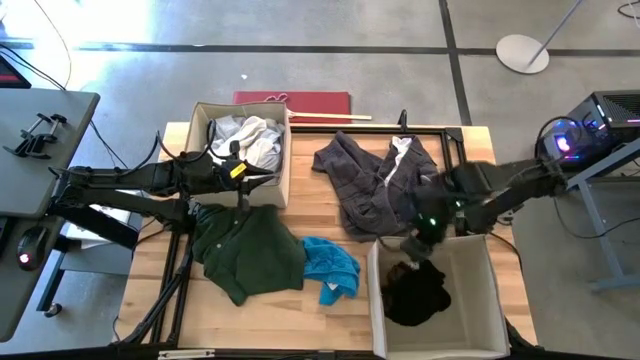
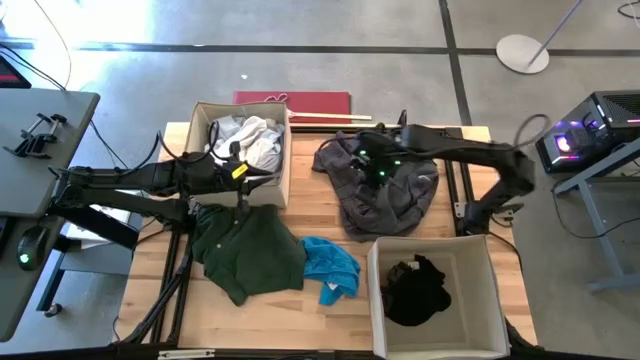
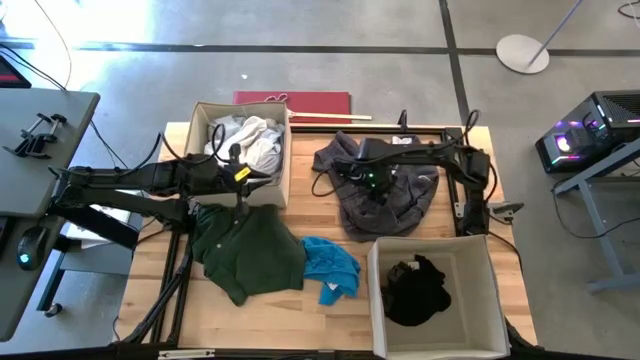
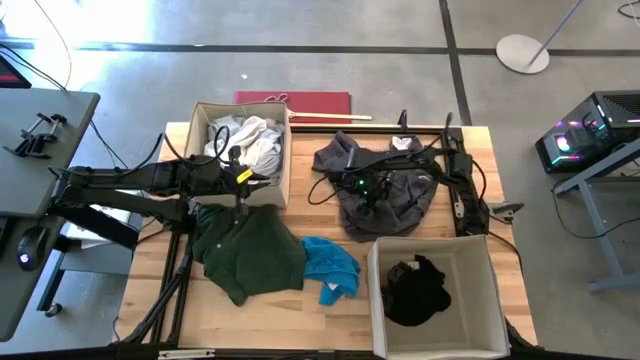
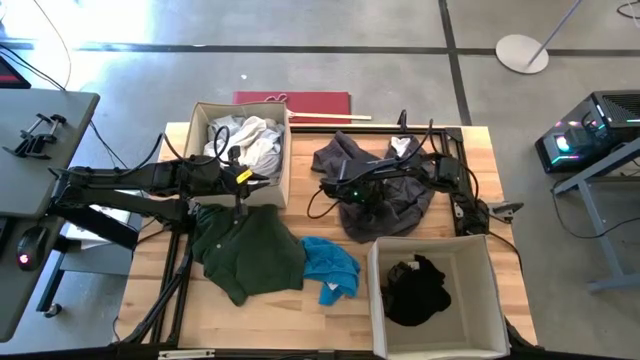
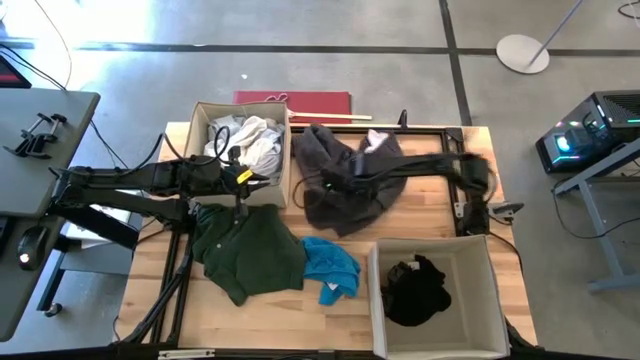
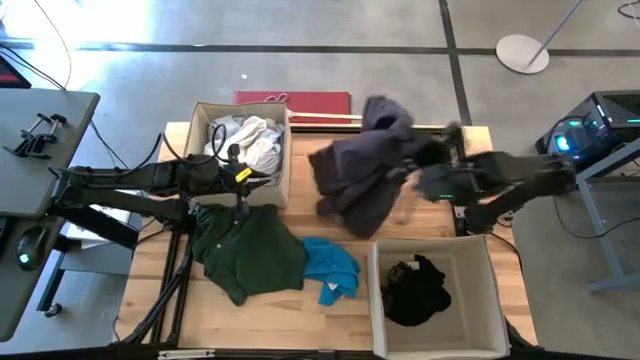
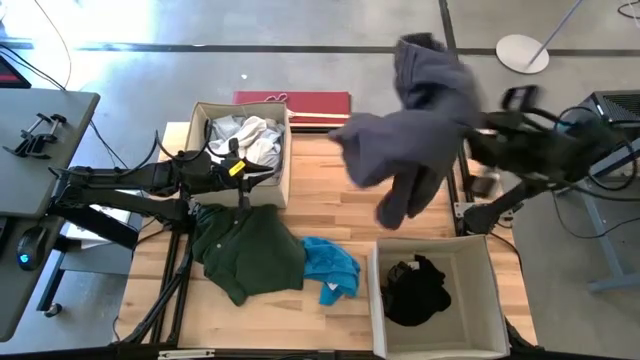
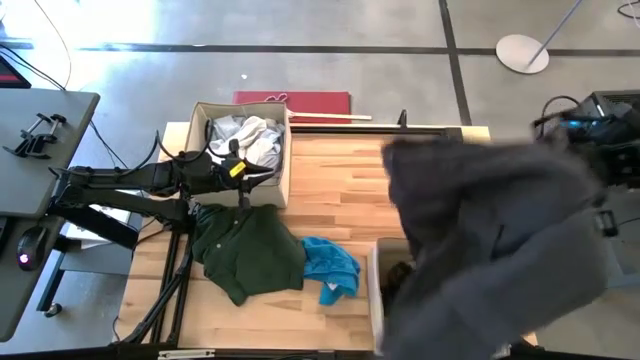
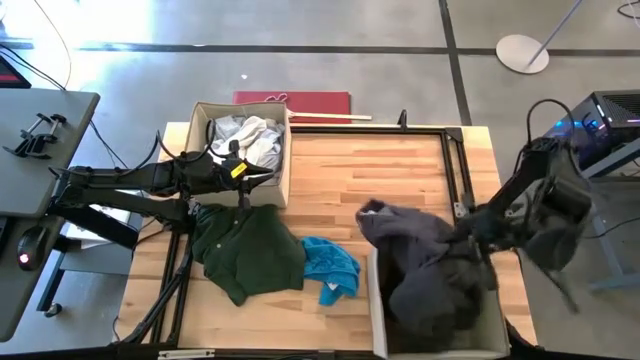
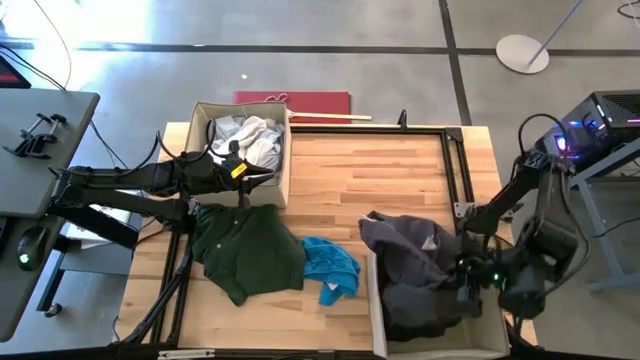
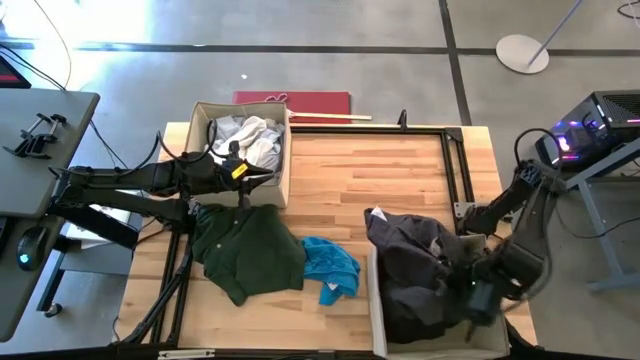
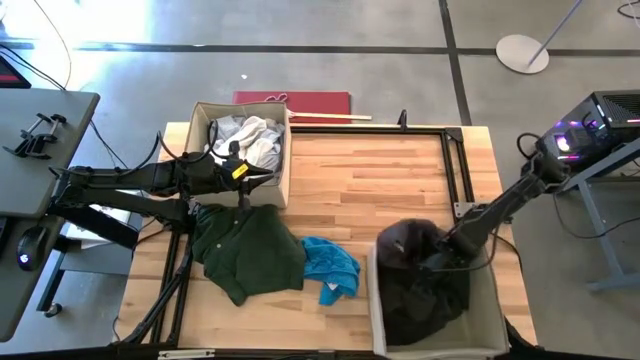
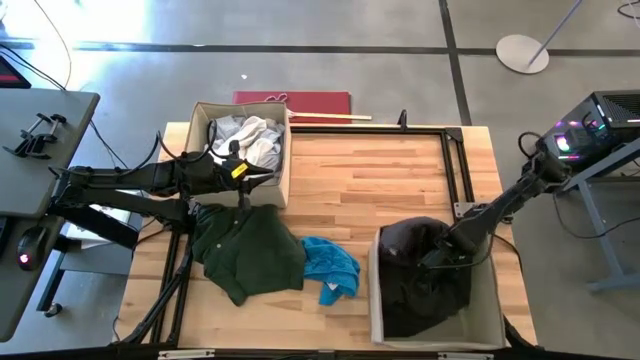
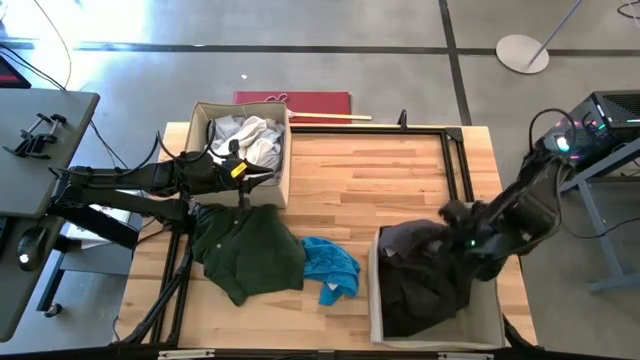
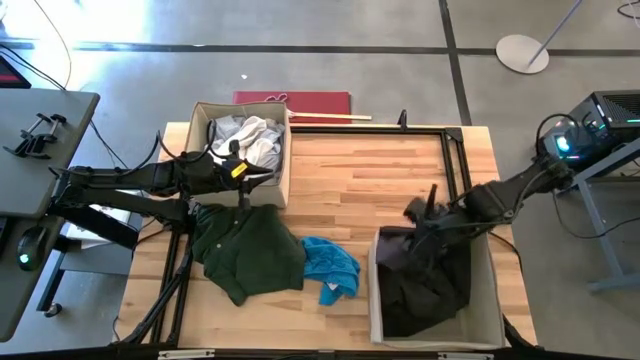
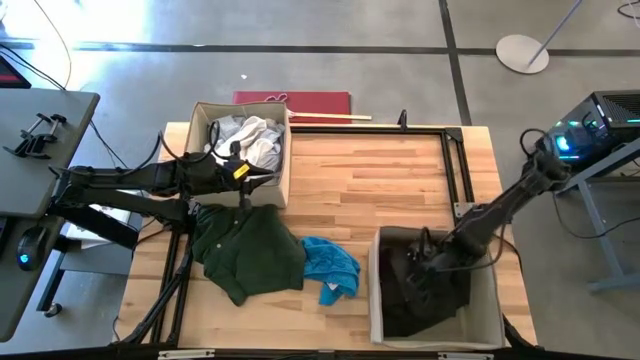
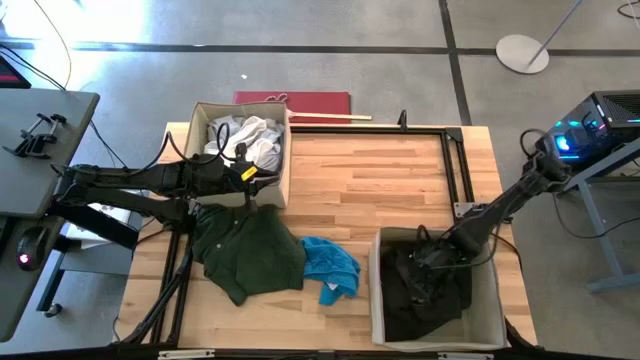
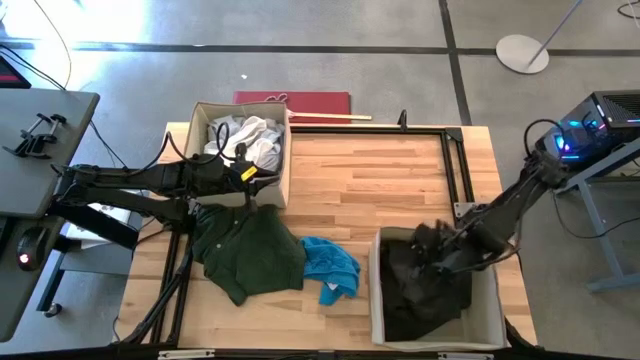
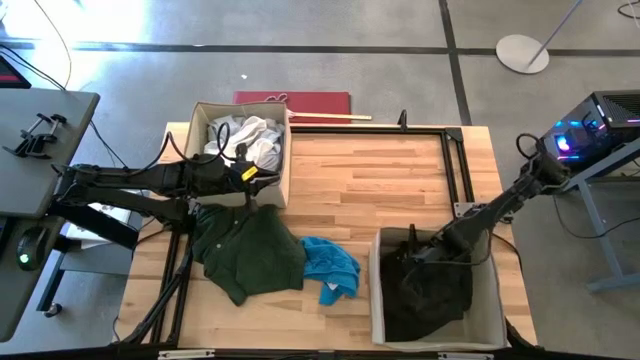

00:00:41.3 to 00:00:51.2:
Task: Sort clothes
Put the gray shorts into the bottom laundry organizer

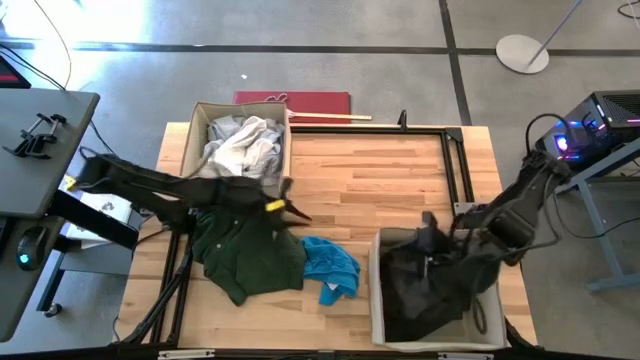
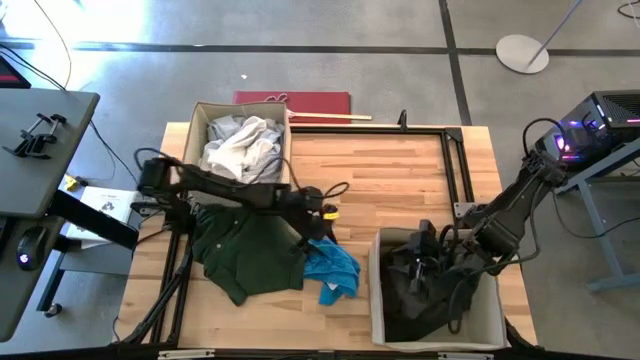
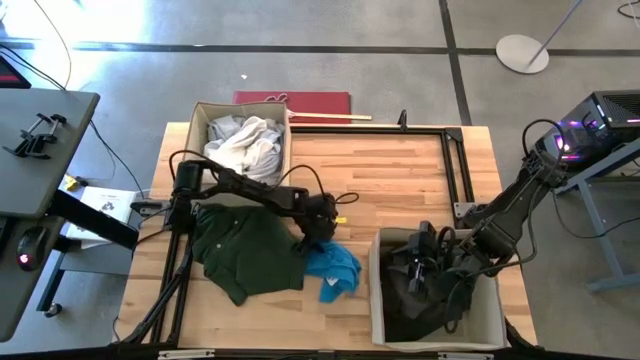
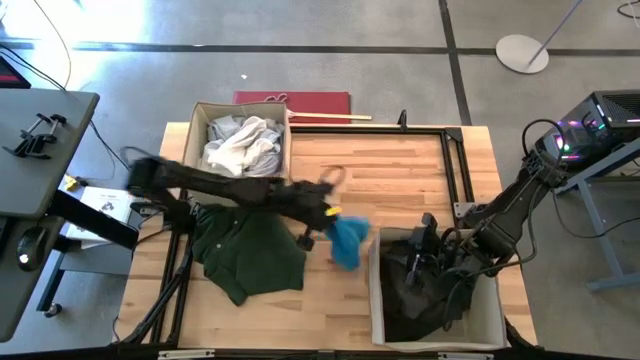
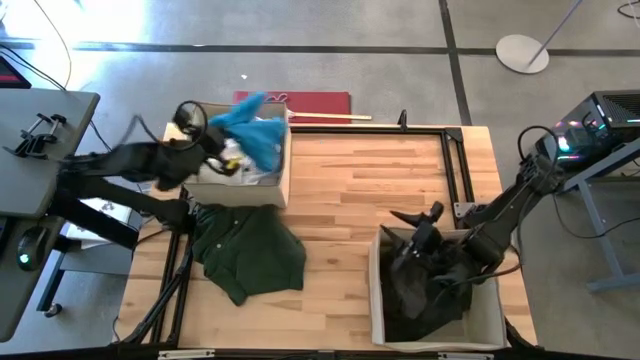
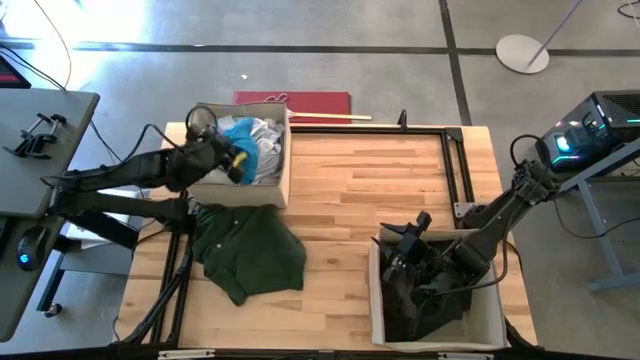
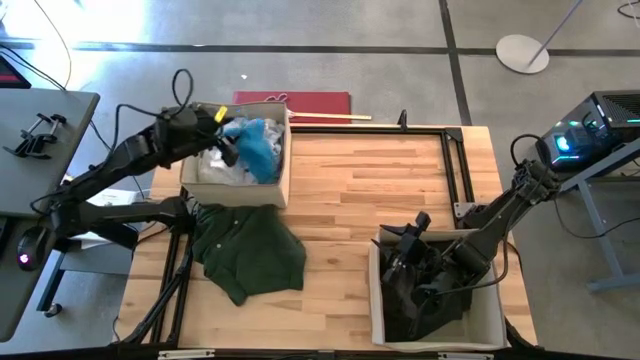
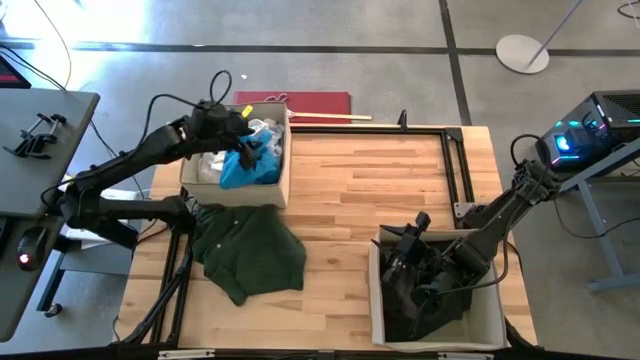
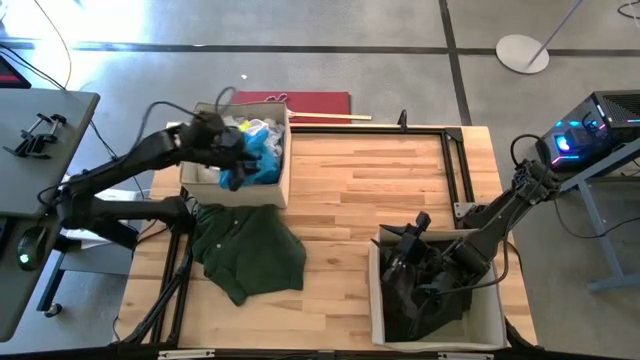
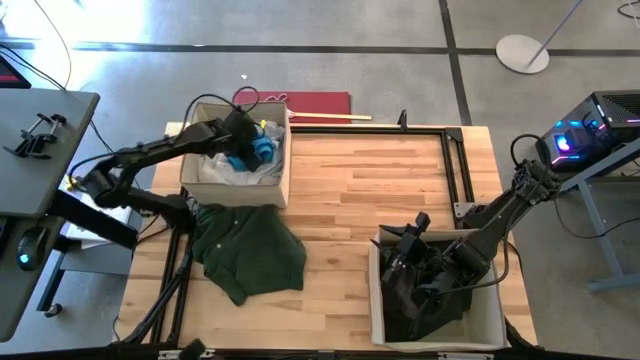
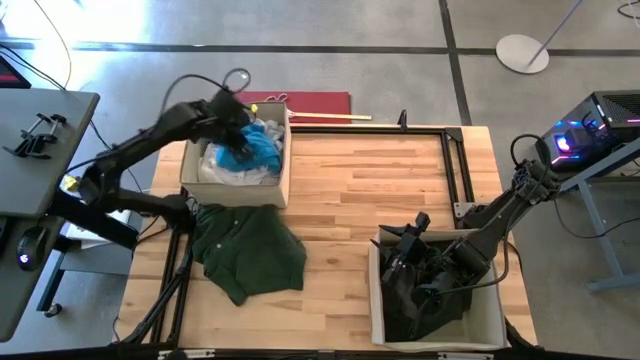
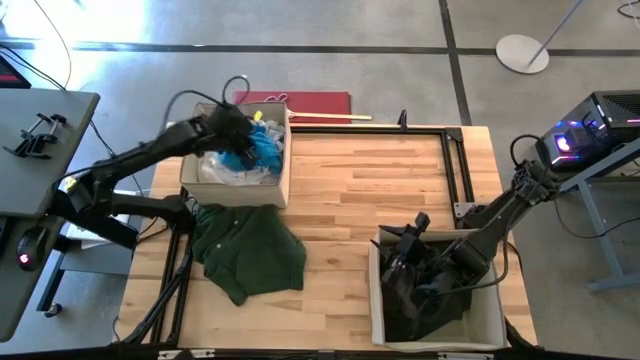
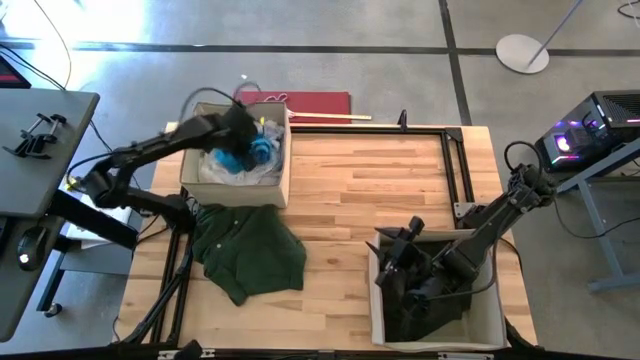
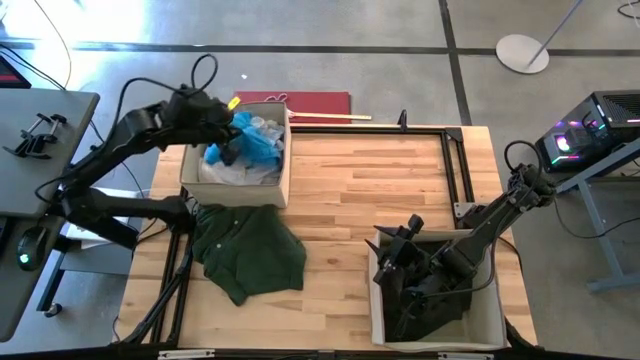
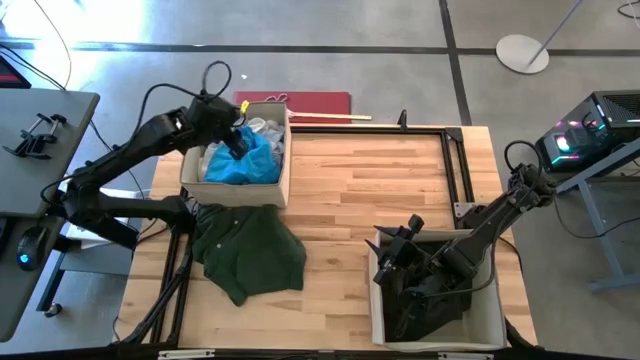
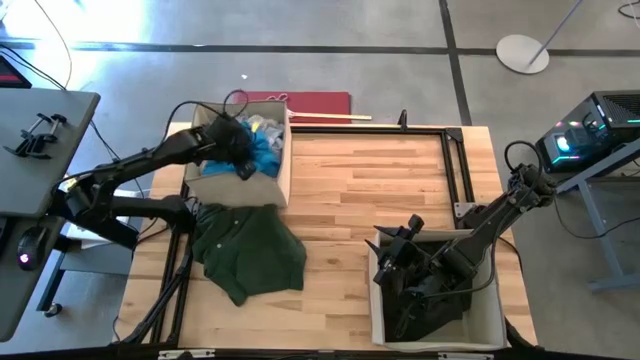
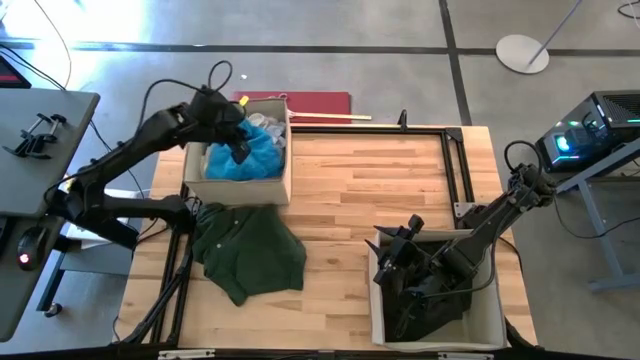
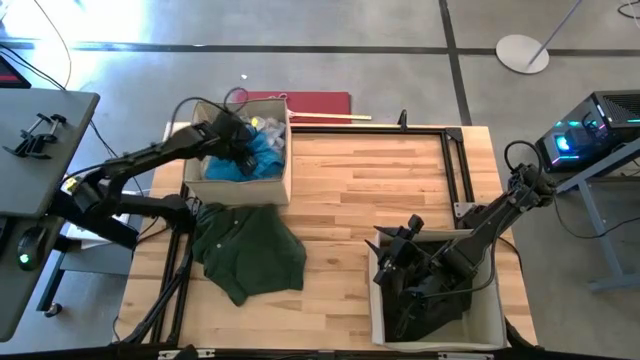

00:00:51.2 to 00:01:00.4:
Put the blue shorts into the top laundry organizer

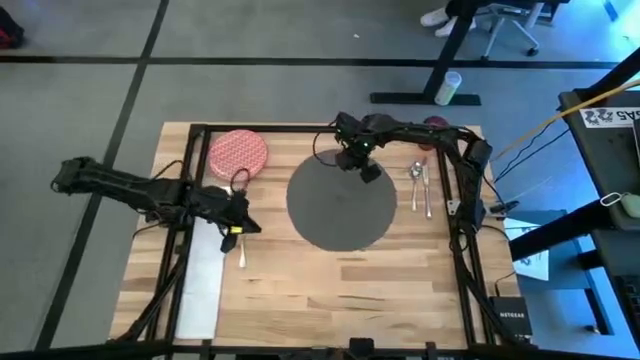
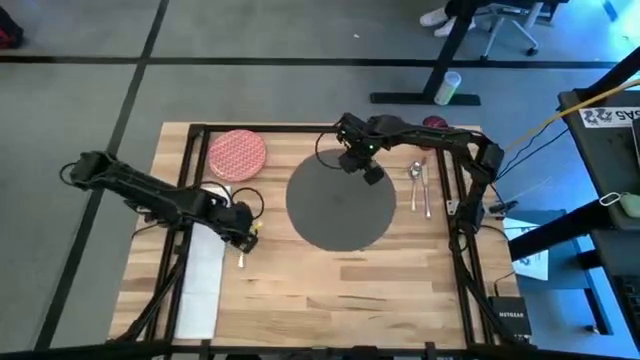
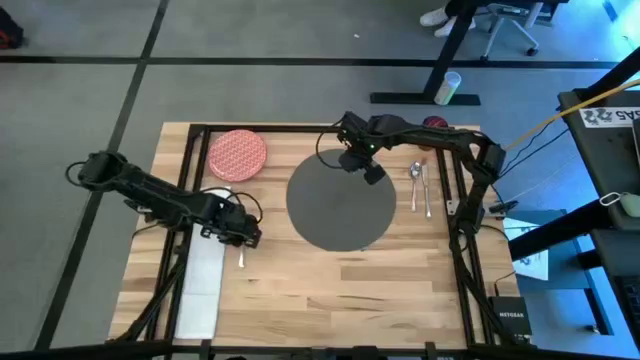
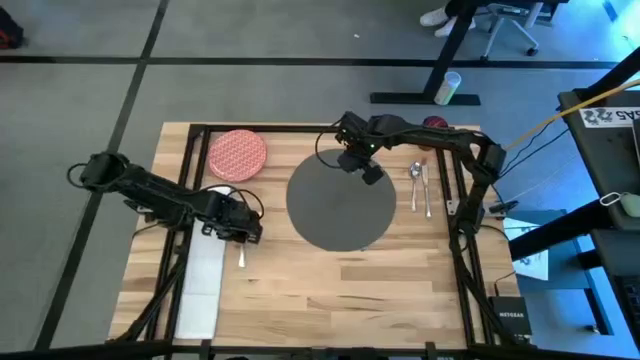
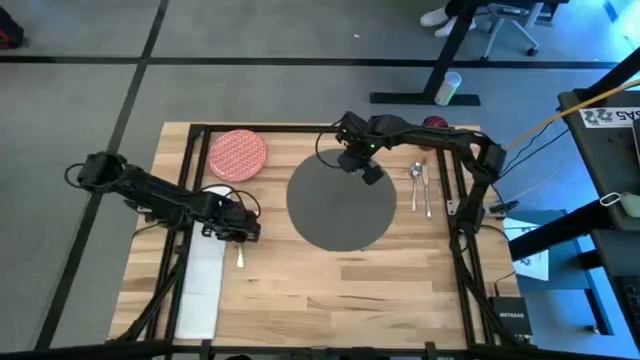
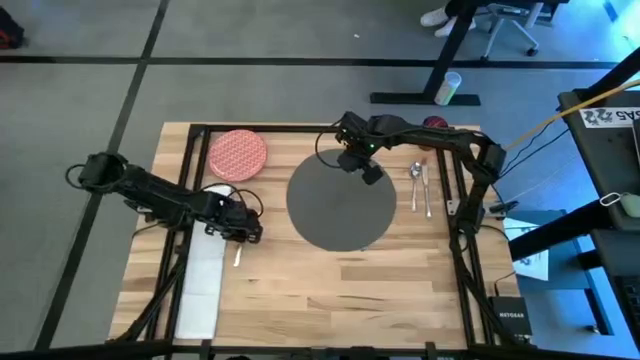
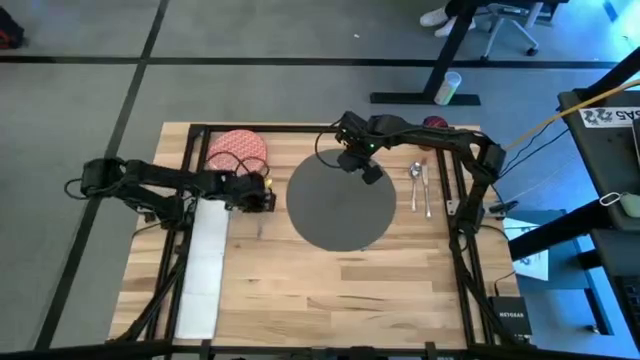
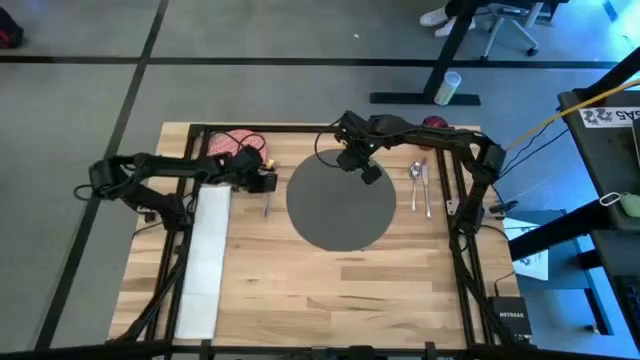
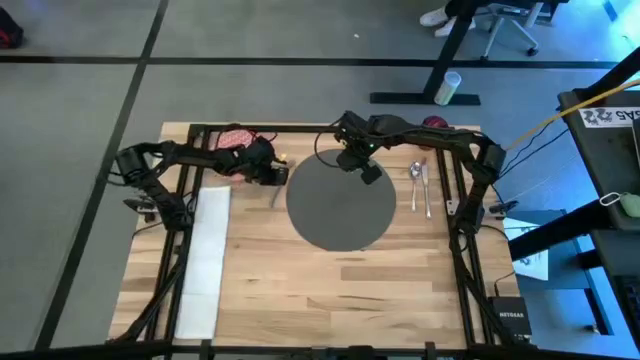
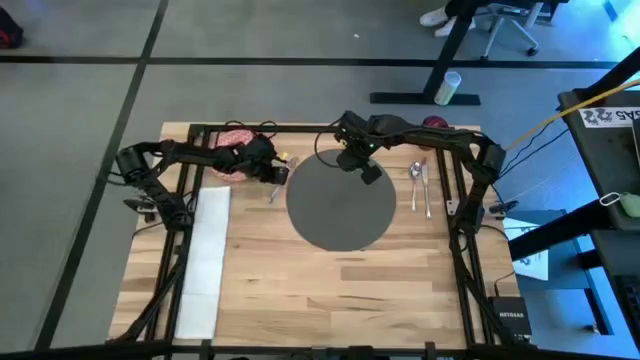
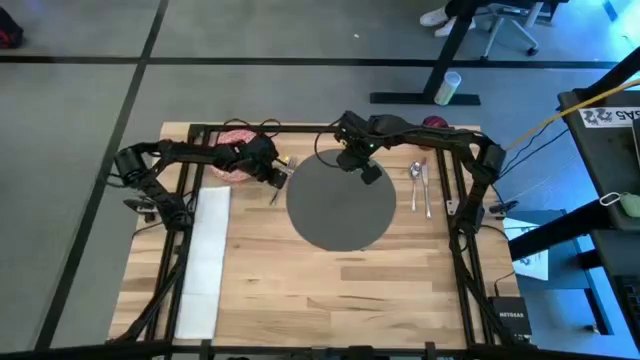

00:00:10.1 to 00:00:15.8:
Task: Set table place
Move the silver fork to the left side of the gray placemat
